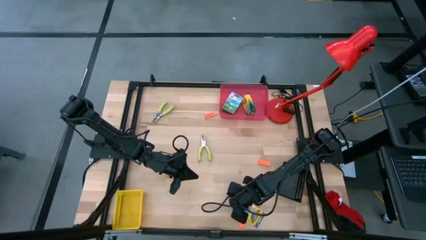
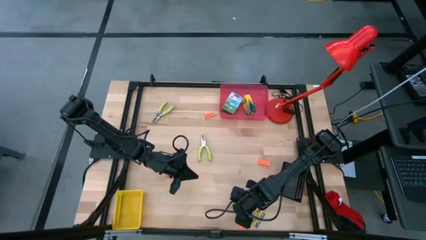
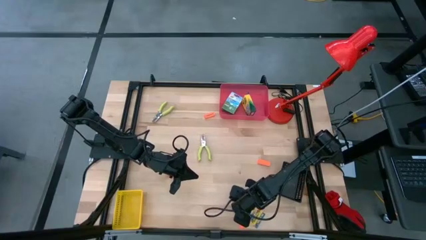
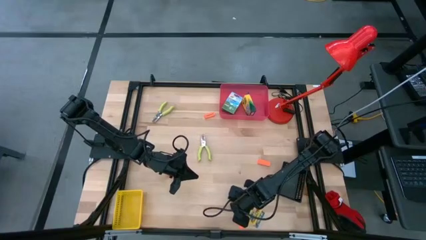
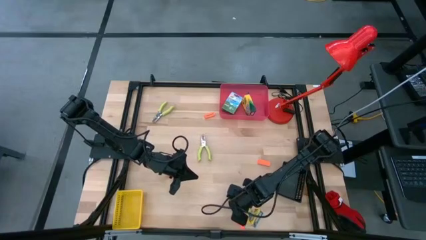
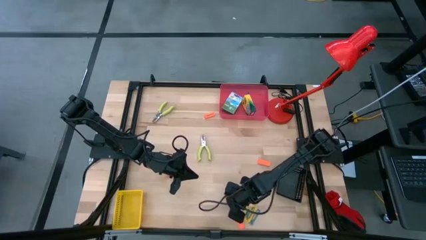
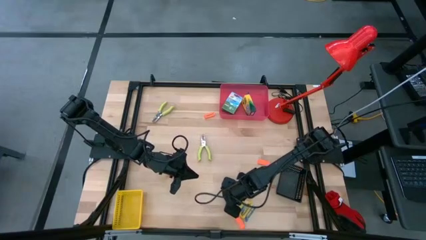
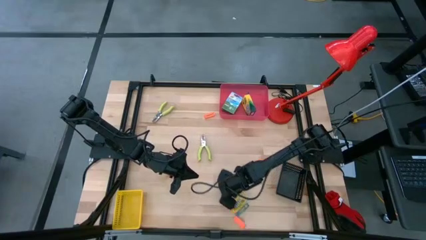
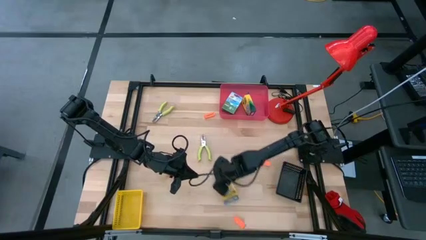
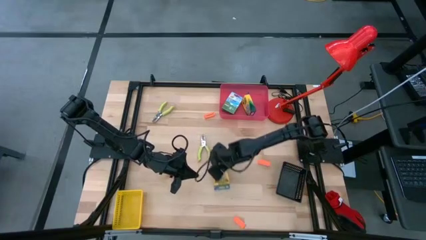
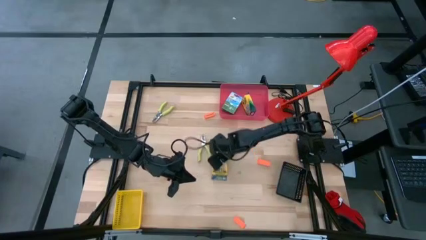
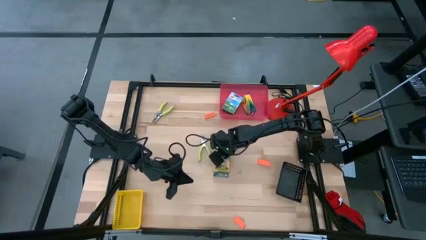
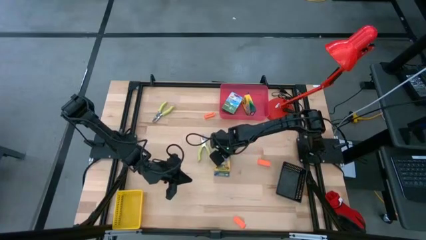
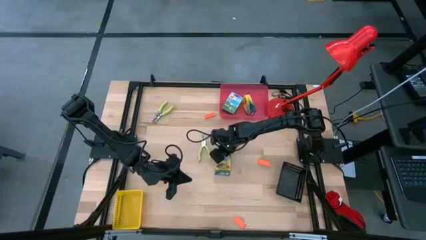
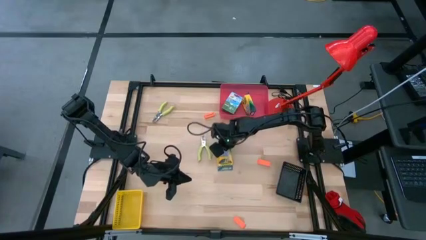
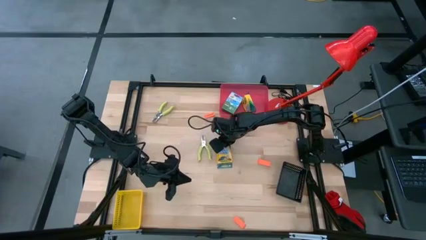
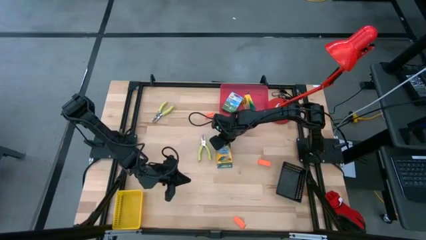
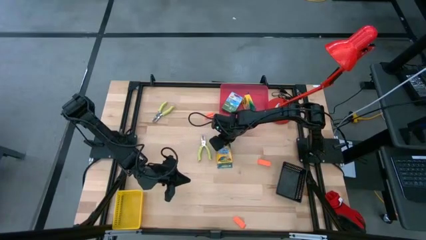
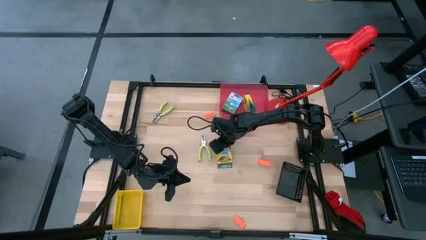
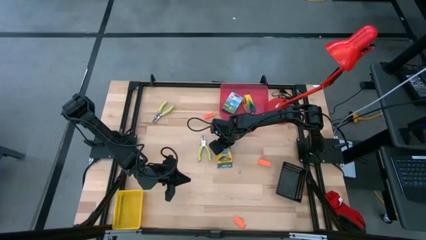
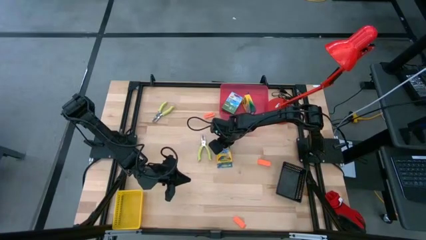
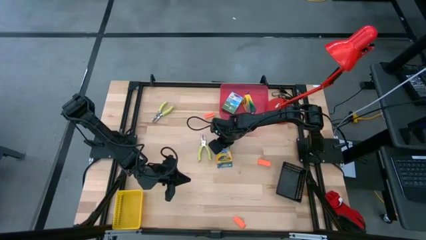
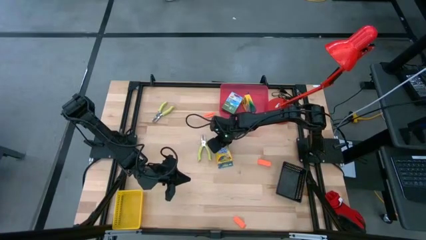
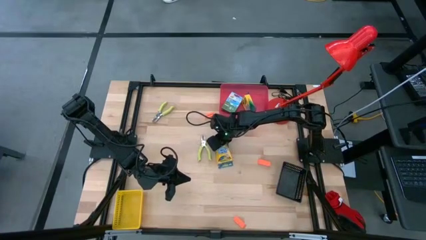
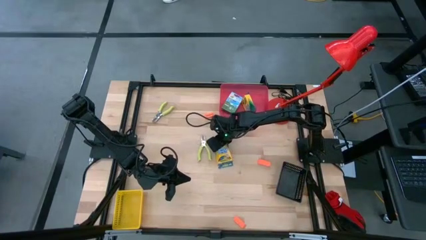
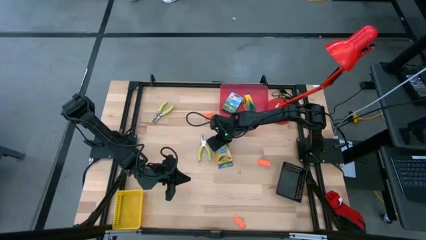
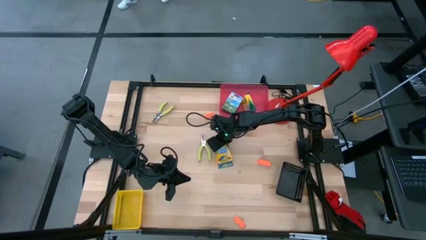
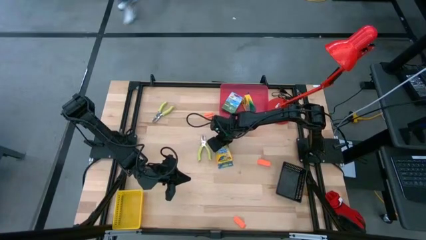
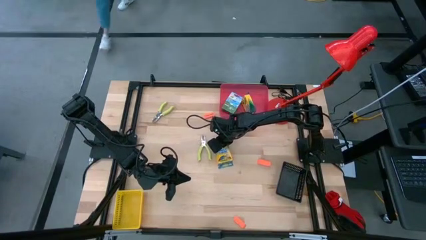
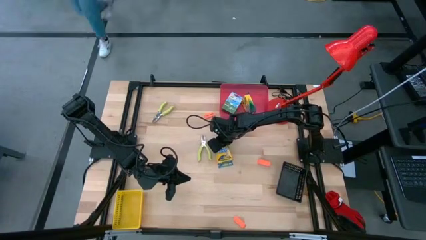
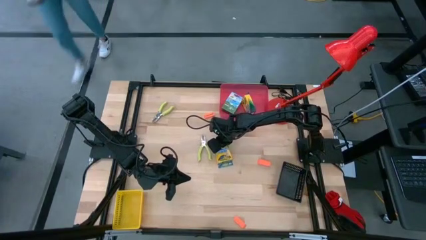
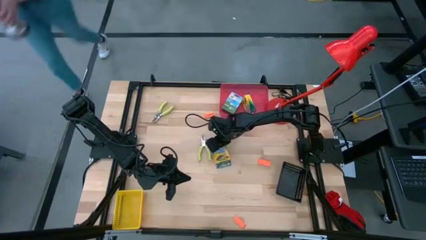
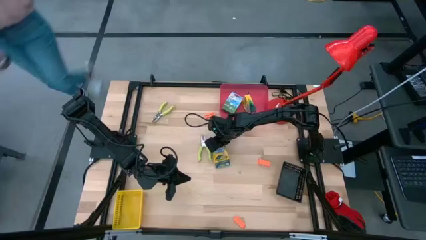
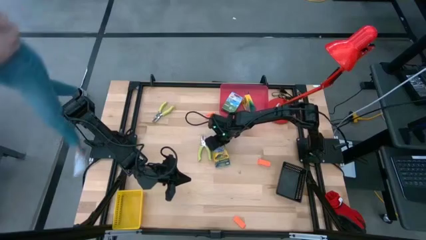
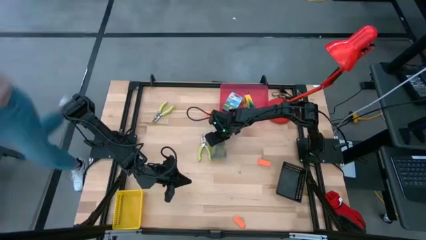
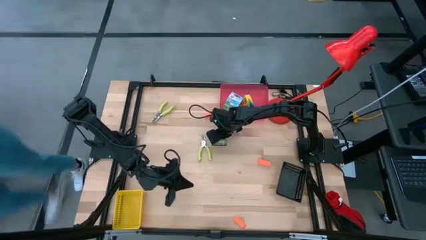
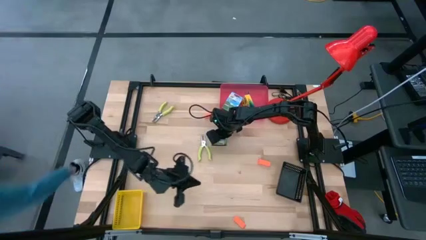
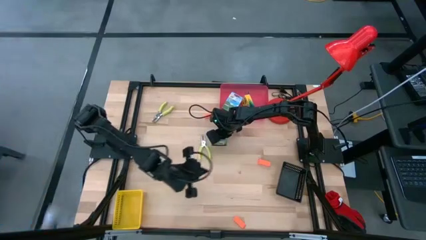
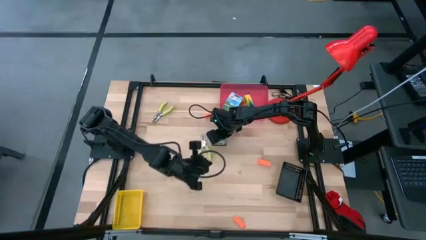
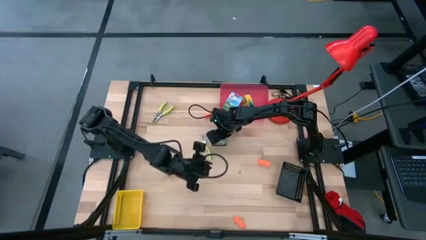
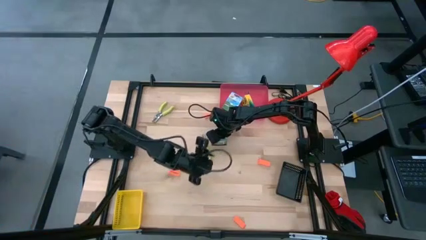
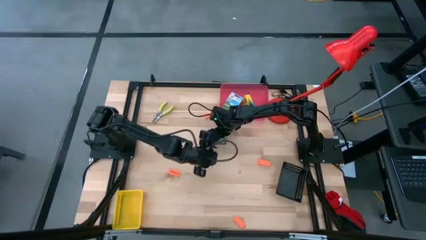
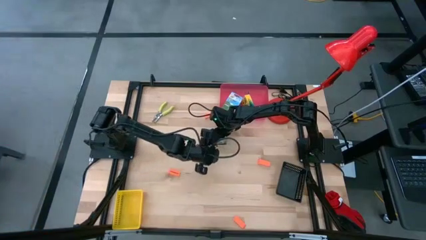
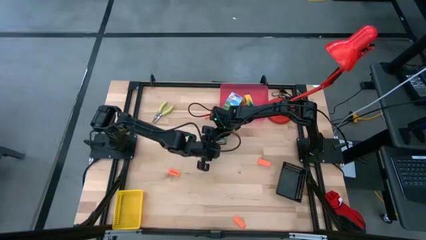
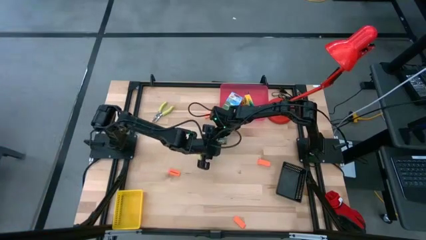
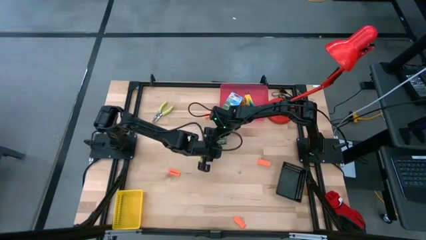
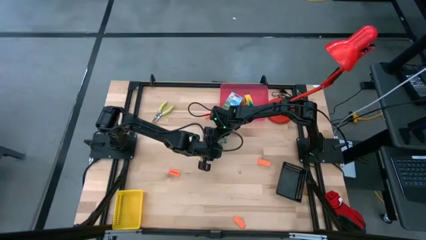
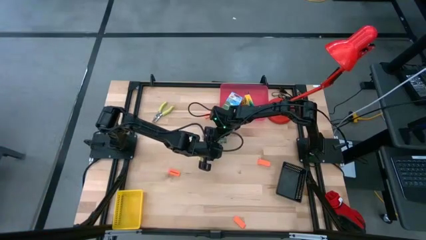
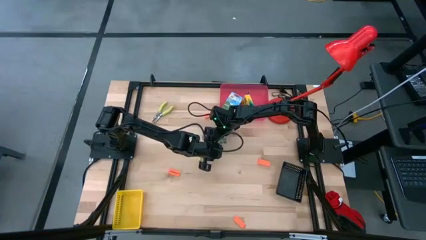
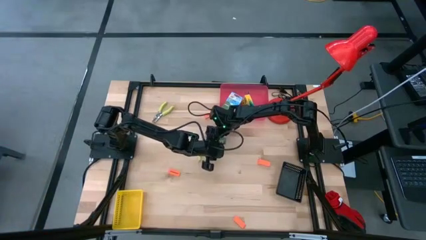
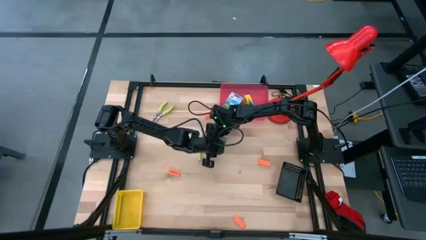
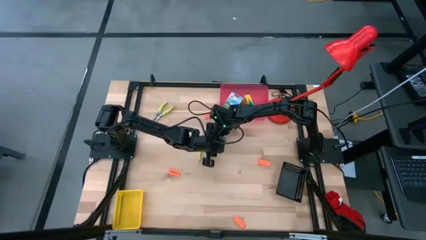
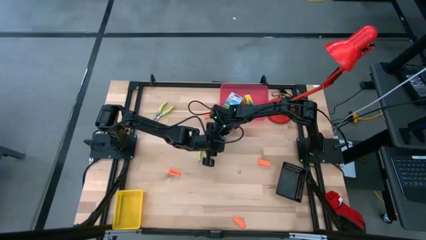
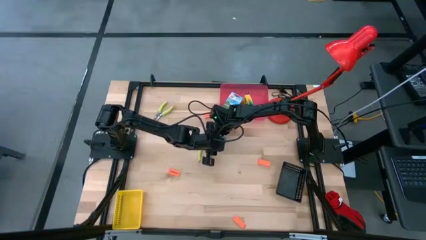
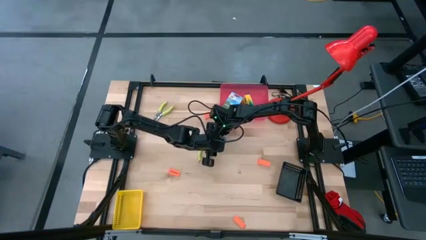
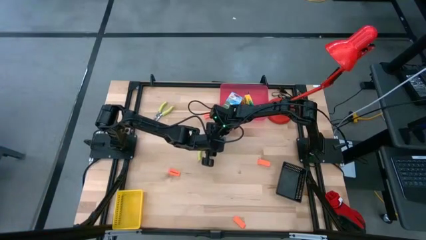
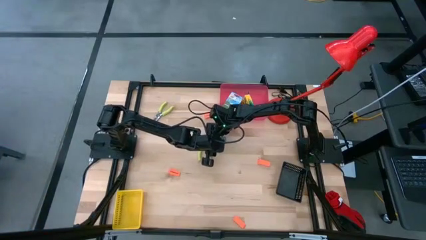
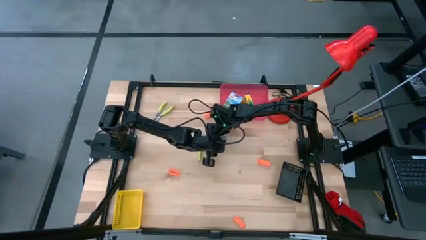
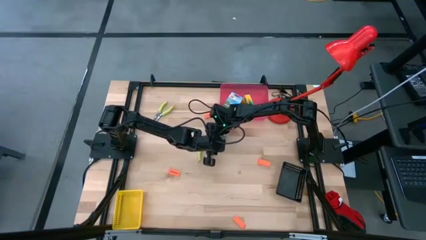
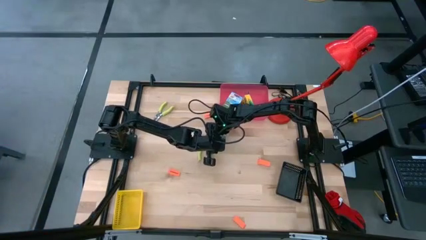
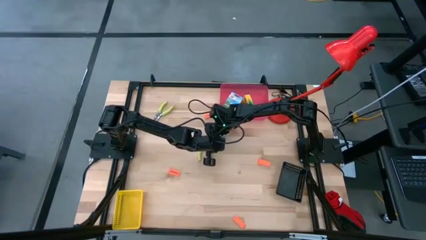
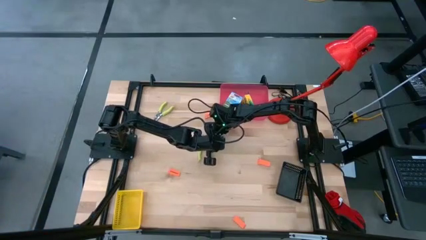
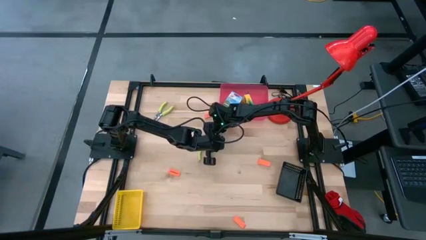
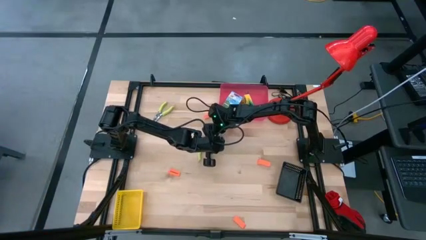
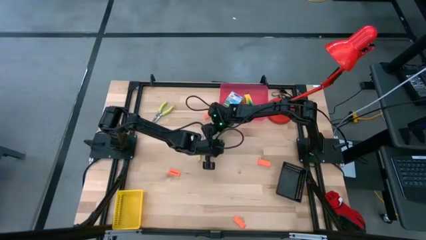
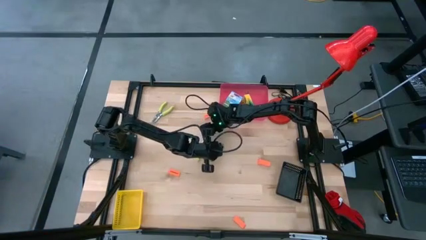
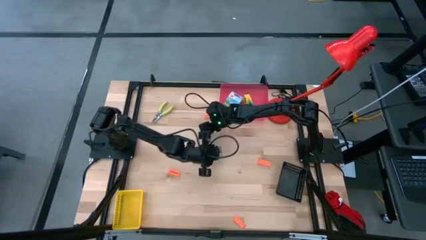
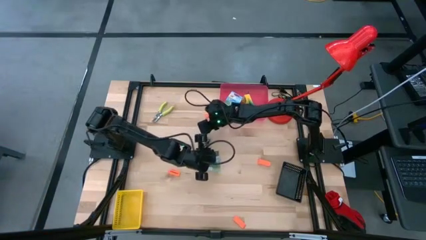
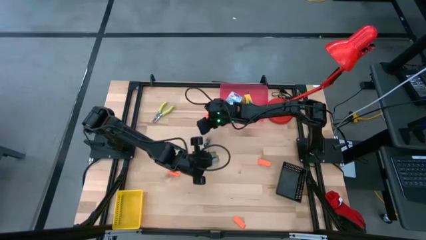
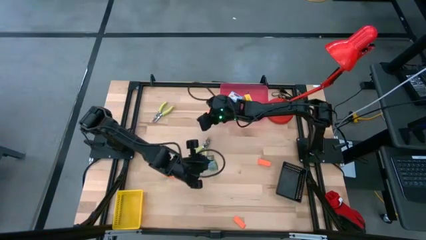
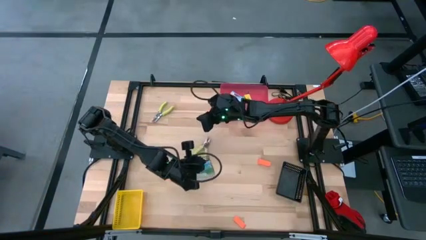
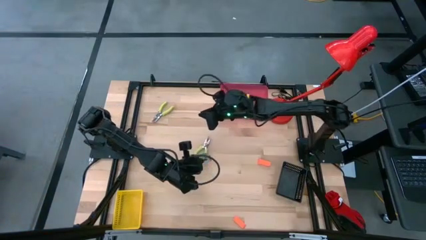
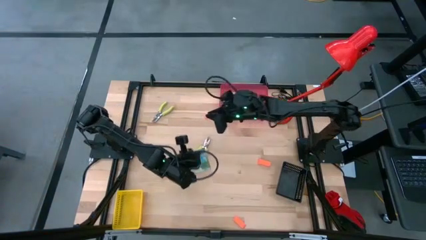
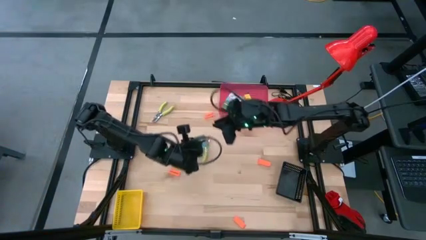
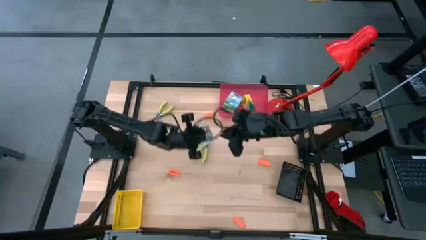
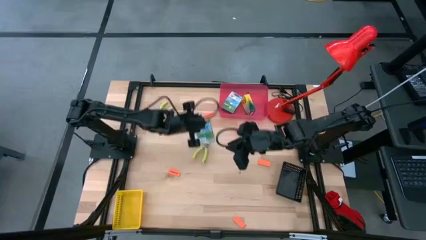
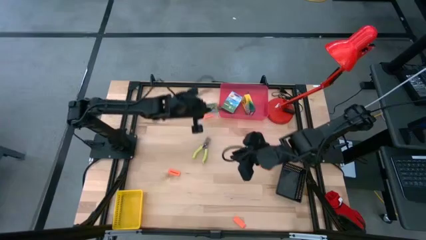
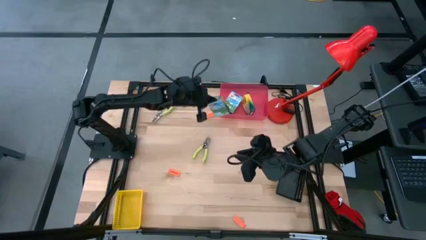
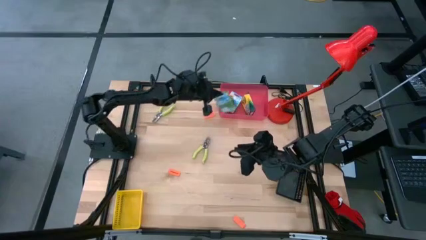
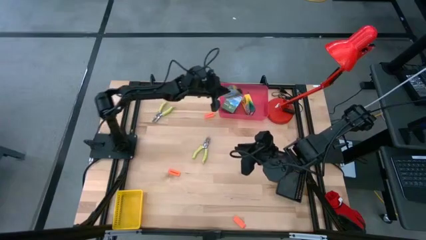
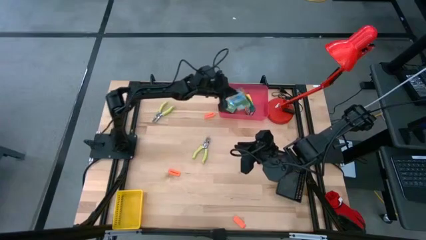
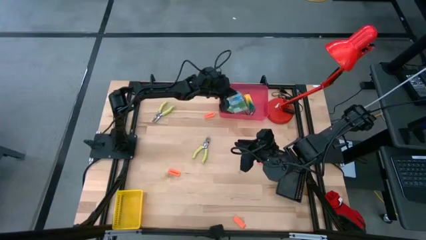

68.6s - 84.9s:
Task: Pick & Place School Supplies
Put the yellow crayon box into the red bin
